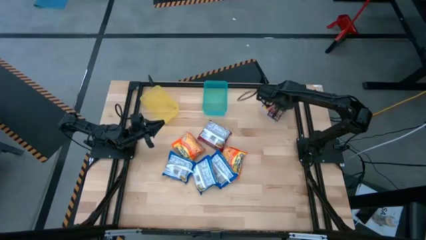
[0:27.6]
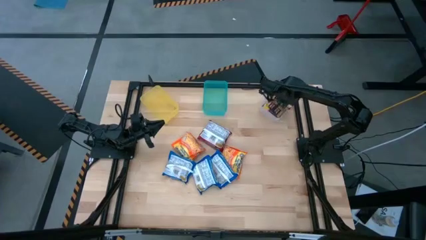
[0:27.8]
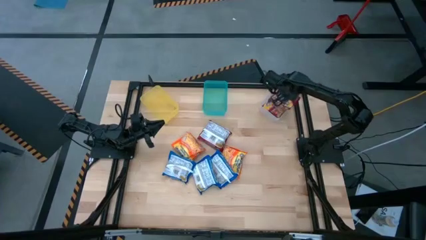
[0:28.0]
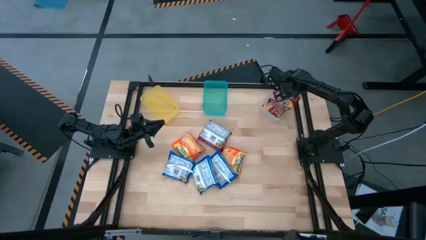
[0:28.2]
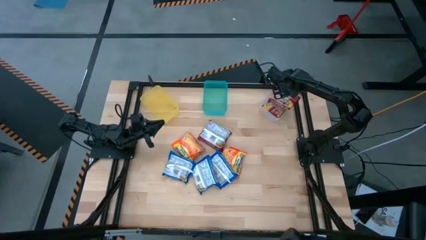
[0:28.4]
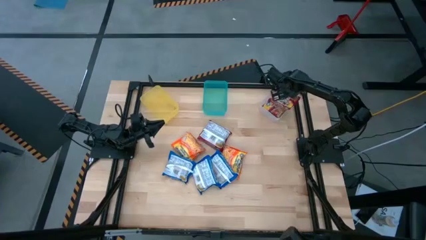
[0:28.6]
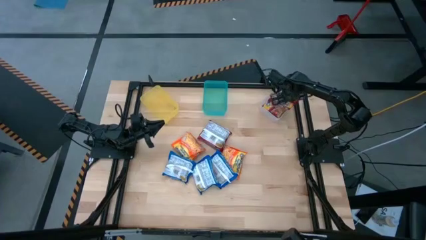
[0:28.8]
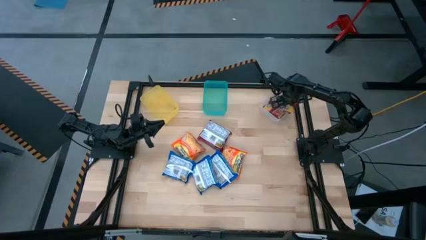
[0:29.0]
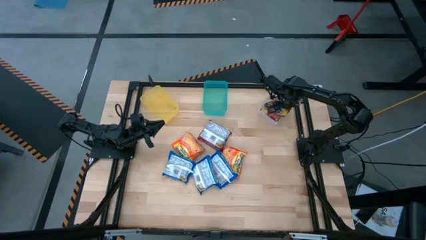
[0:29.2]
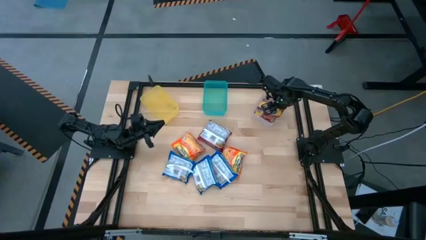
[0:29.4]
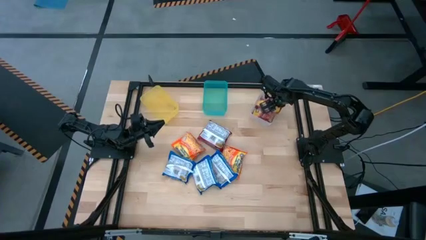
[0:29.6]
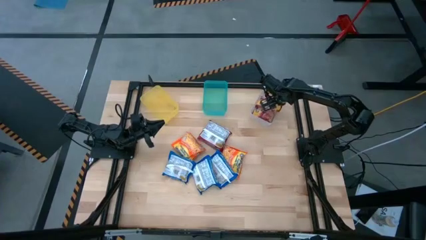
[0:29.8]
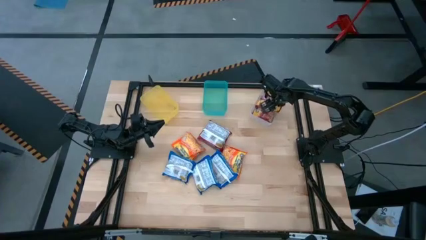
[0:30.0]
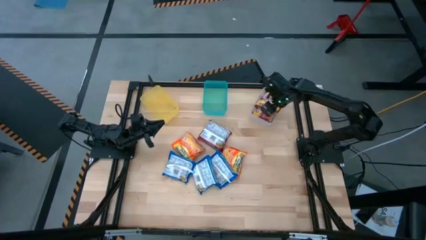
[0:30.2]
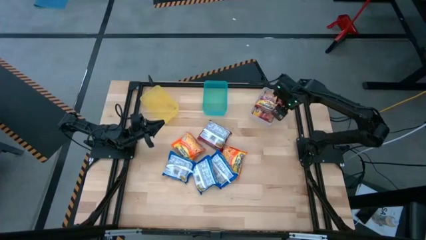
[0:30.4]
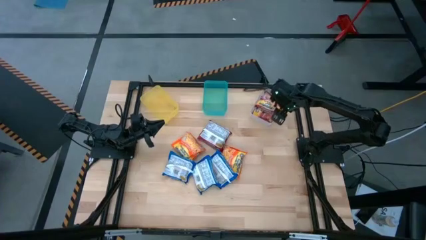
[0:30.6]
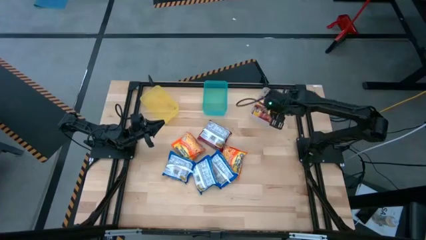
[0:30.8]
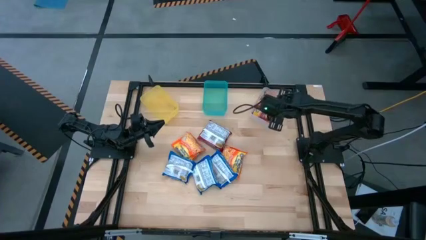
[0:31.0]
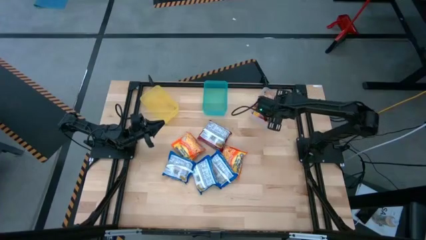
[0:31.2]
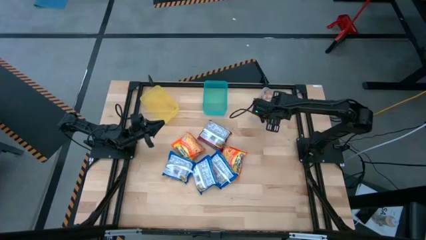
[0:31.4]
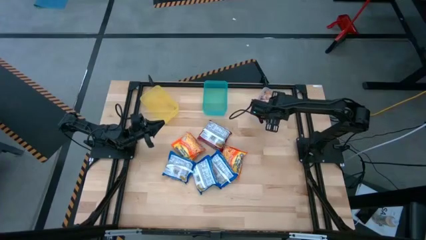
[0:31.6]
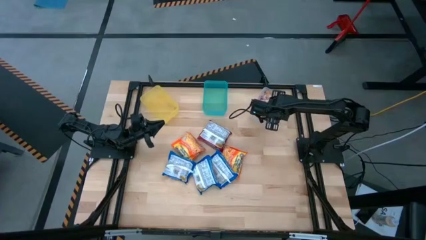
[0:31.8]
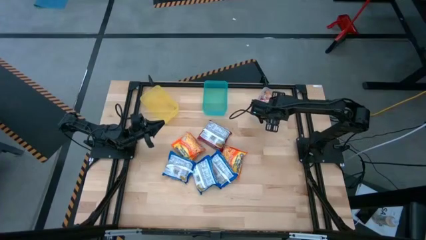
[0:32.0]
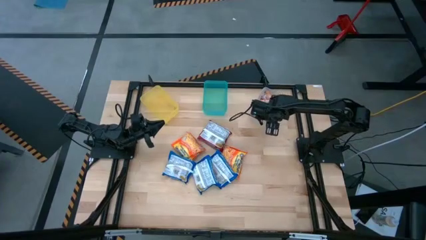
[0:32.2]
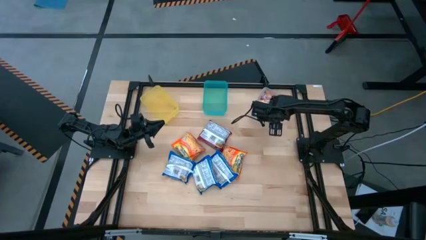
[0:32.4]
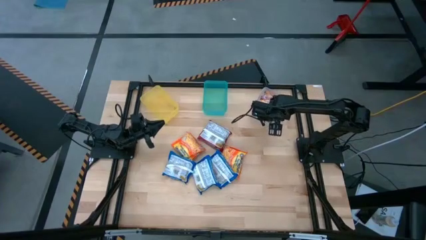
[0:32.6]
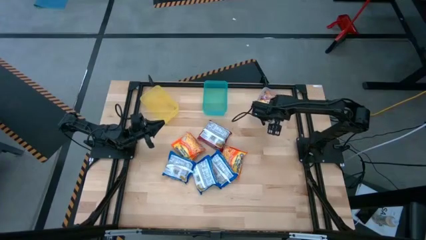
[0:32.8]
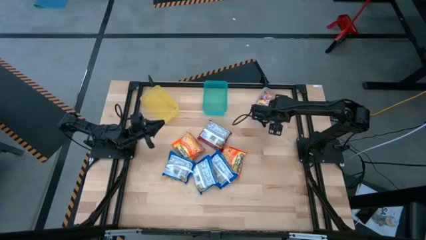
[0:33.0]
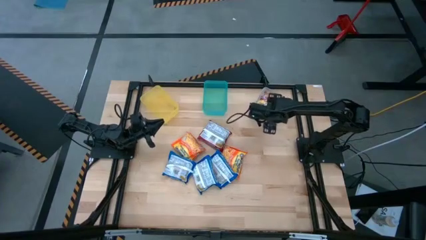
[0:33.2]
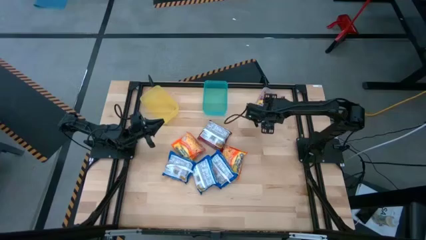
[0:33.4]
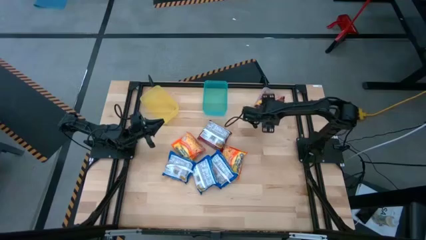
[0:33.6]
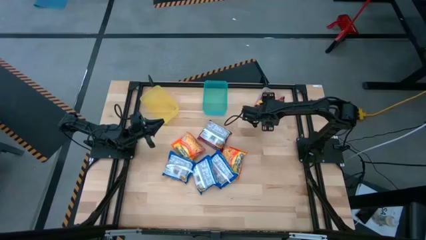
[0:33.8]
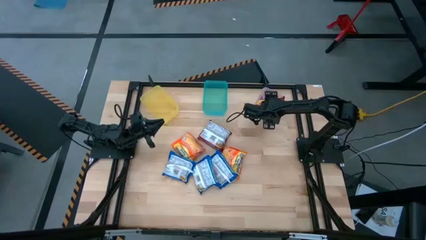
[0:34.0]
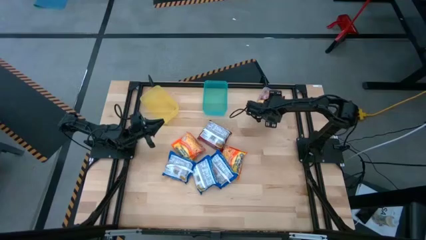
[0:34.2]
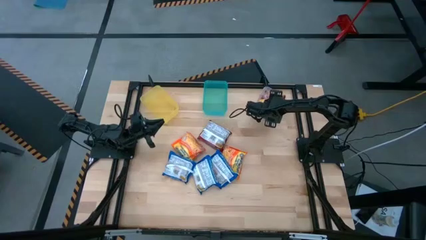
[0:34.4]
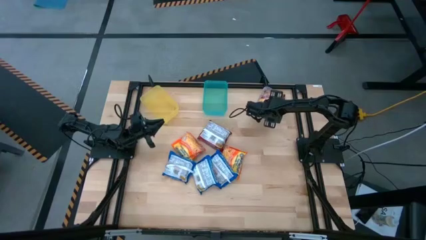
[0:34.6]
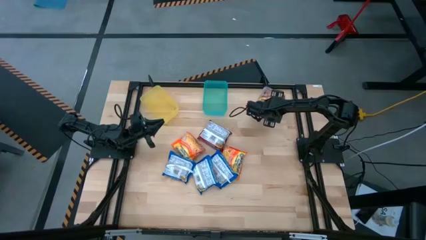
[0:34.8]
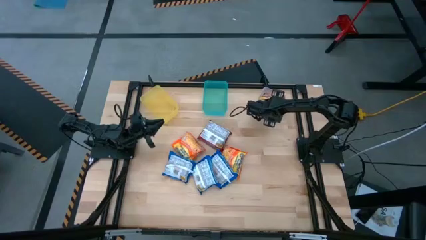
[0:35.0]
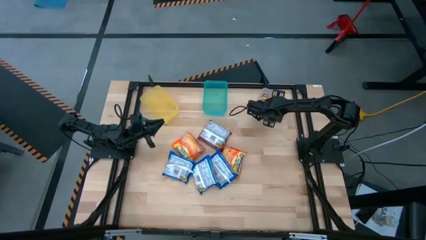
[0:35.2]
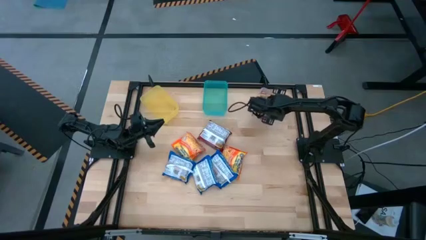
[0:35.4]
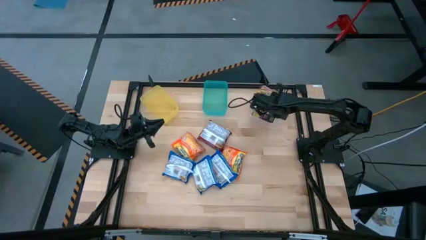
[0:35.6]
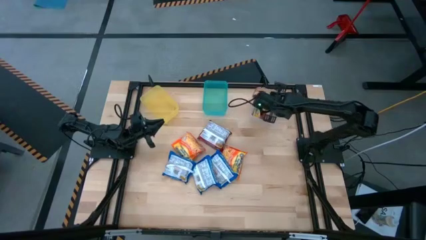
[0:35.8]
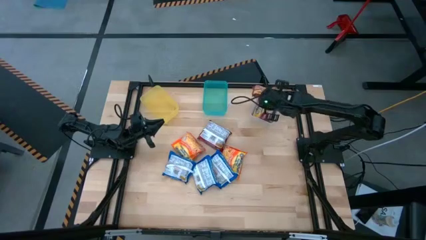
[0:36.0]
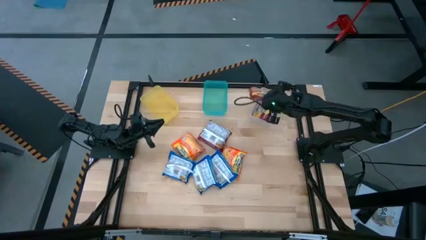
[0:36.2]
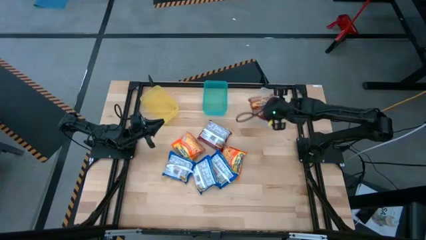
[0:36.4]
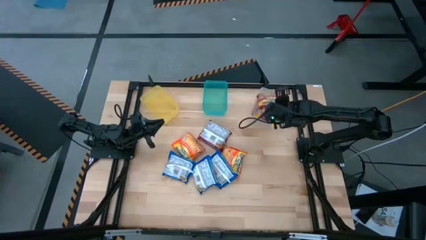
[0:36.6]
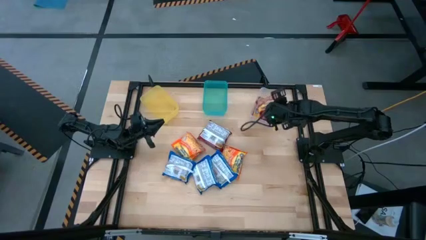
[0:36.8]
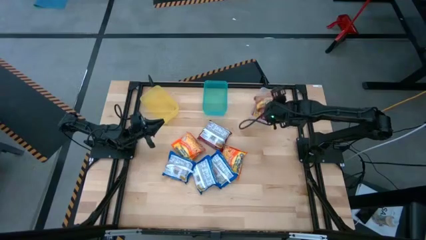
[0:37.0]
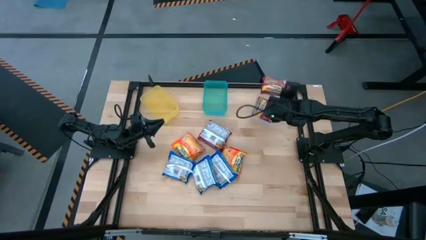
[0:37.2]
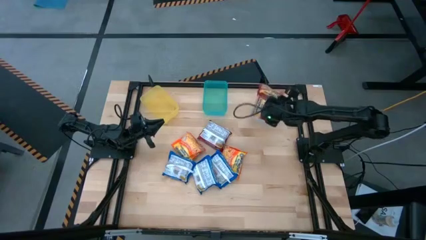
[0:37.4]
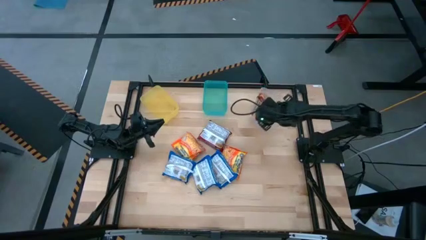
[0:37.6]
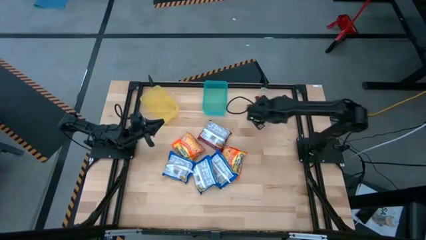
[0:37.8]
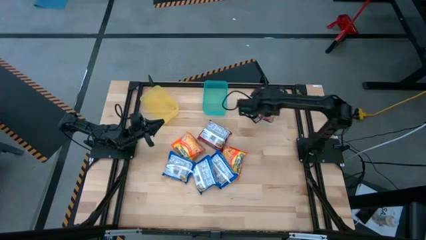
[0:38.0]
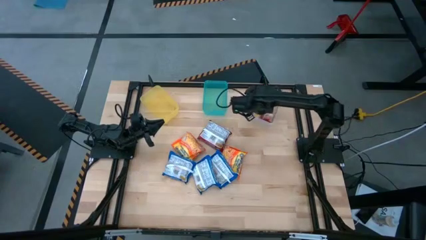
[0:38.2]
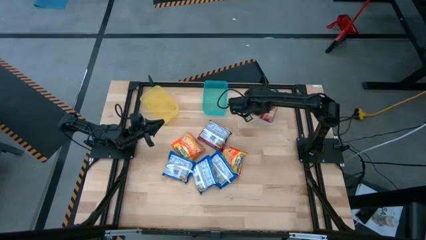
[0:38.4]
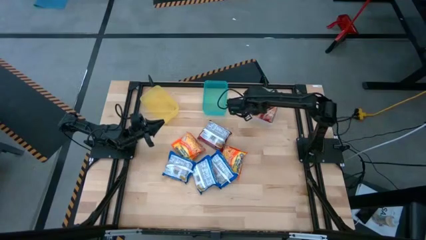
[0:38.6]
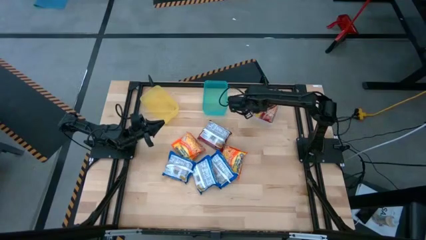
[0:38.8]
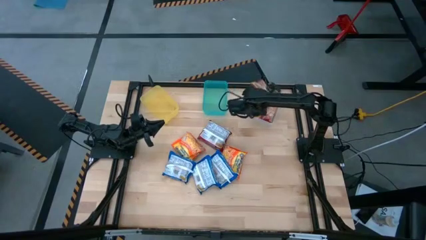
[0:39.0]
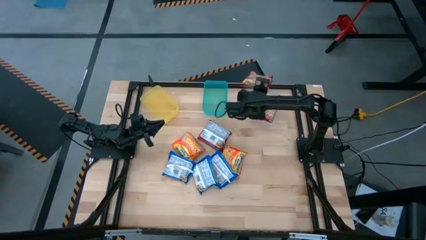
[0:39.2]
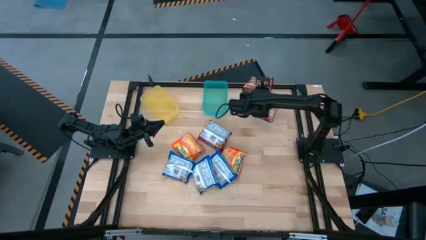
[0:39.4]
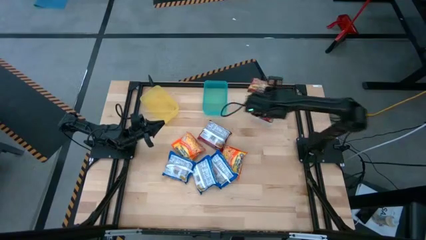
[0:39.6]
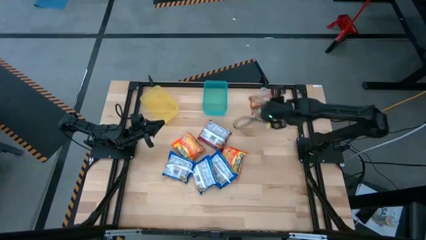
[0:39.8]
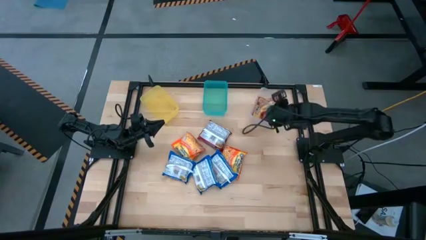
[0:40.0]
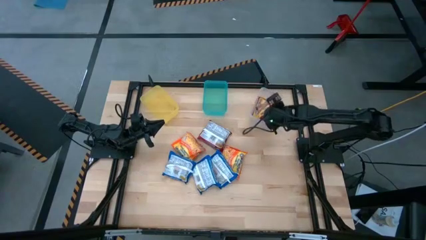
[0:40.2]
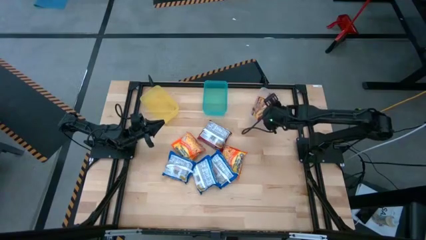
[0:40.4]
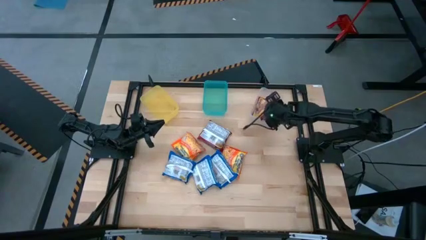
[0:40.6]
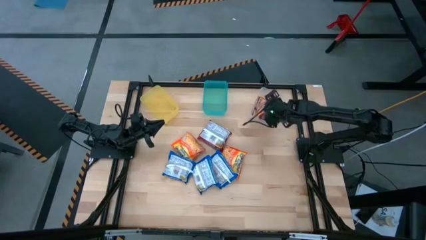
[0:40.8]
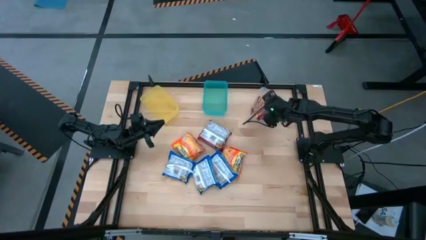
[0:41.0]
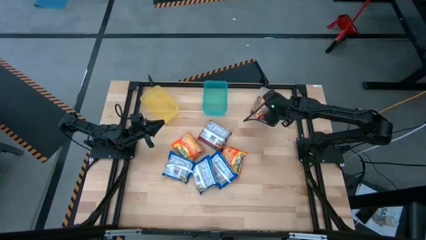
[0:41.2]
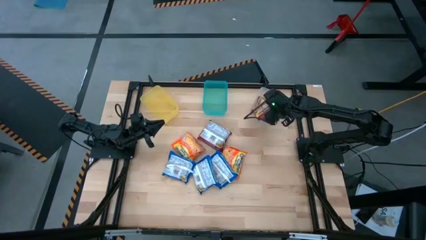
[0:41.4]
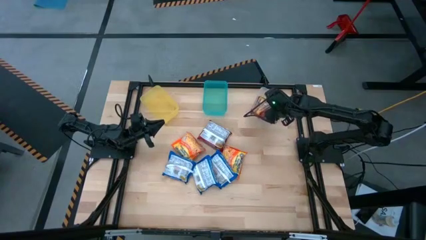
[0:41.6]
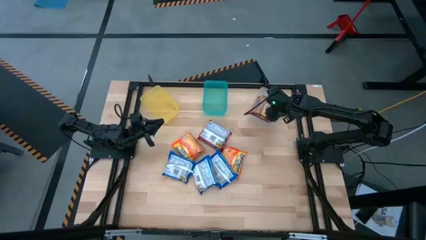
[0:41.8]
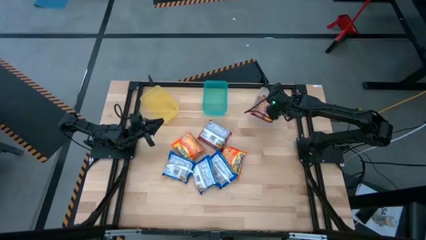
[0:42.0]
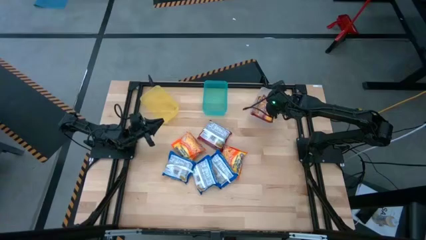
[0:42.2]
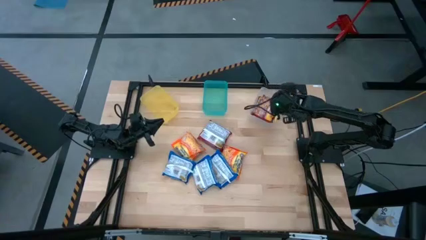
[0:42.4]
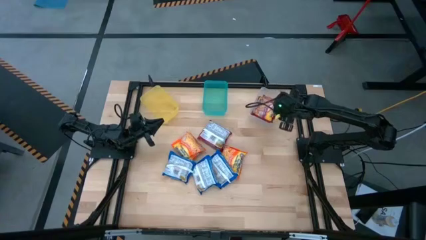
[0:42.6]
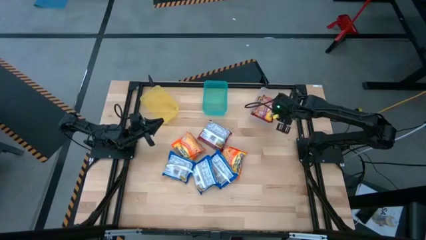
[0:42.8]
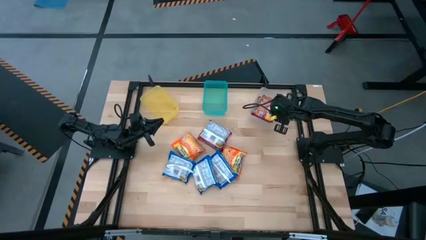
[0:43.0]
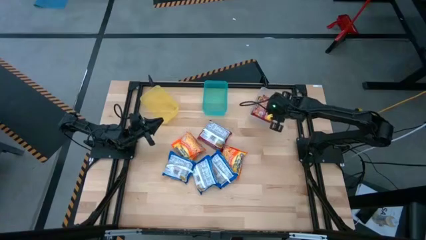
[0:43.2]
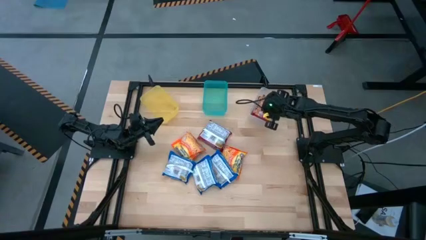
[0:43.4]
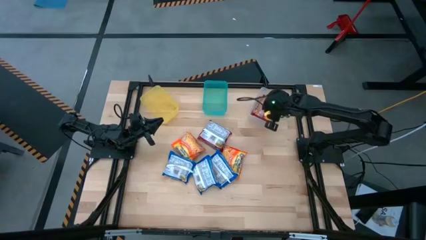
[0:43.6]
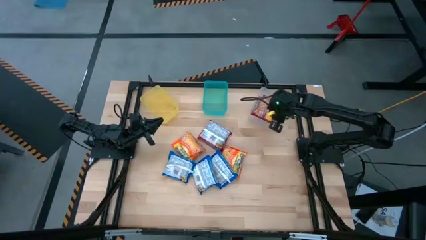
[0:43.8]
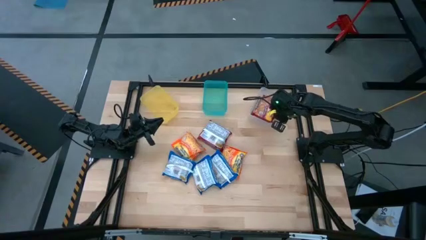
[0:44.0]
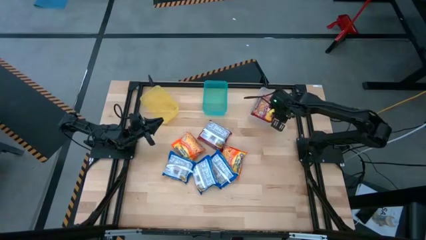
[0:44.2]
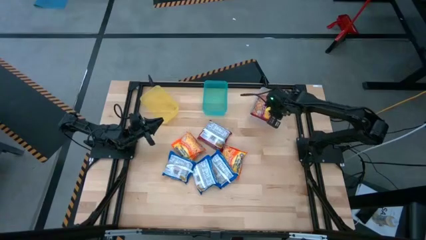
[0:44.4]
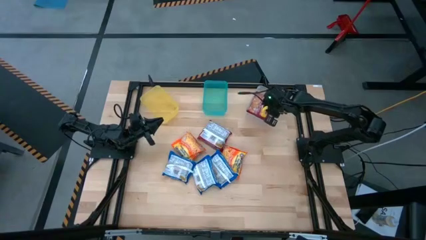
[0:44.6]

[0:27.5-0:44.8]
Task: Sort Maruchan noodles
Put the right red noodle pack into the transparent bin
